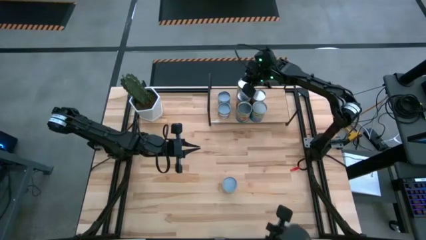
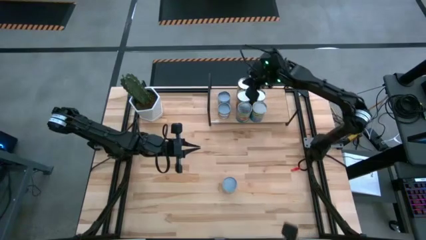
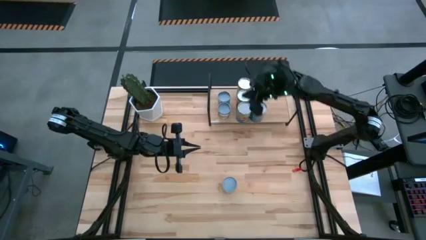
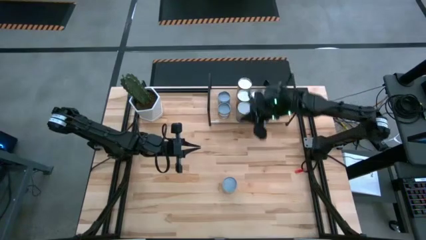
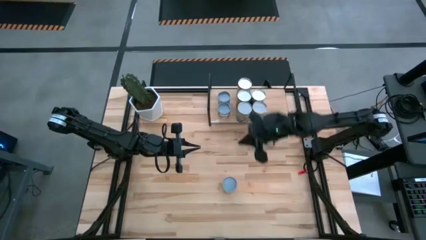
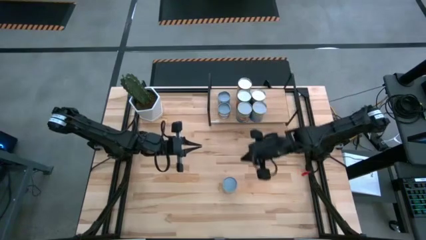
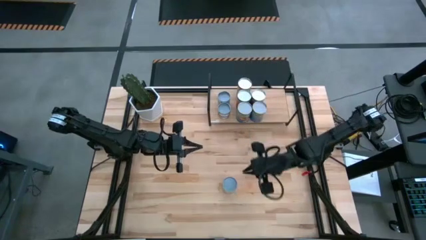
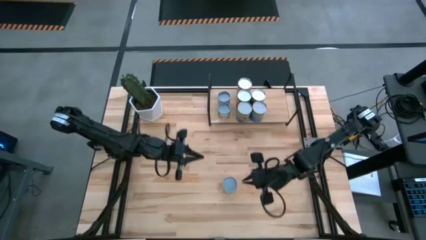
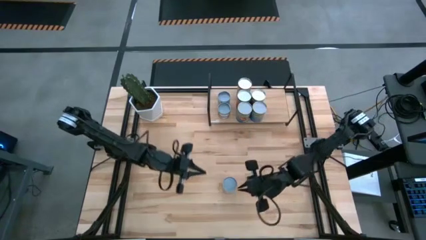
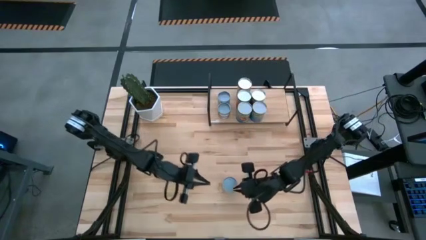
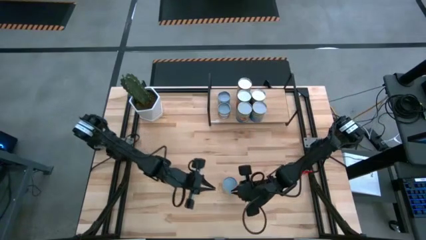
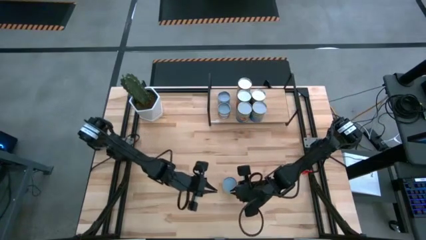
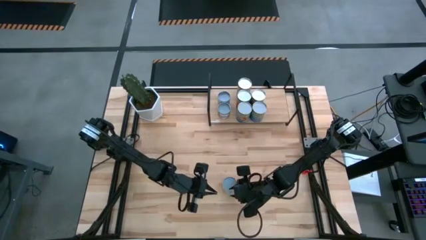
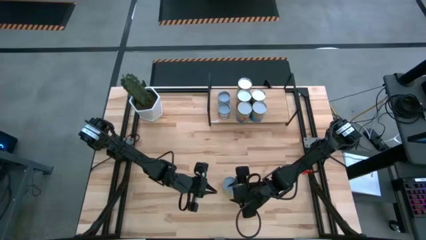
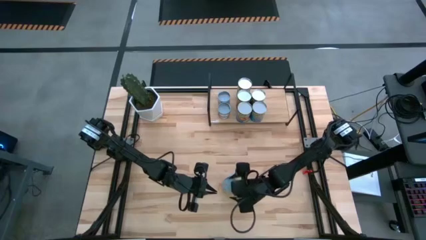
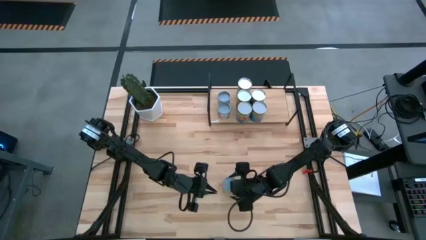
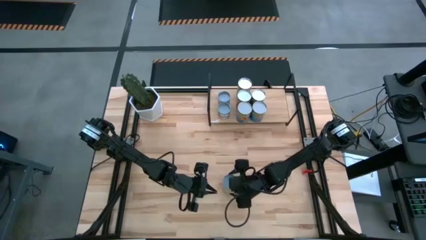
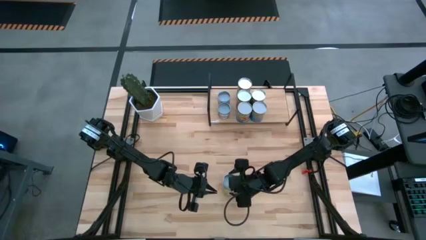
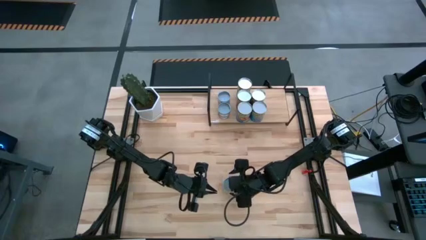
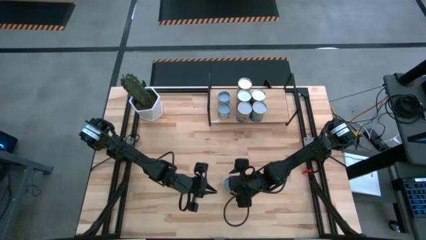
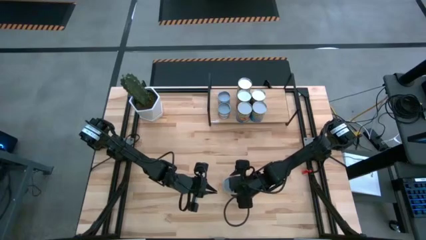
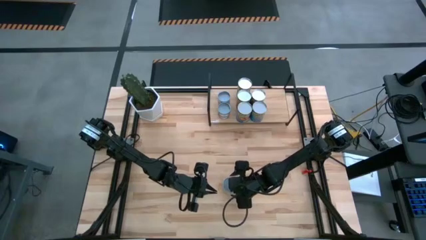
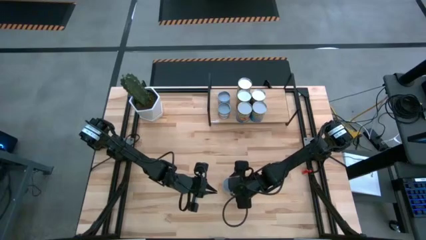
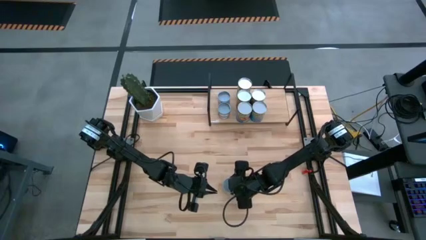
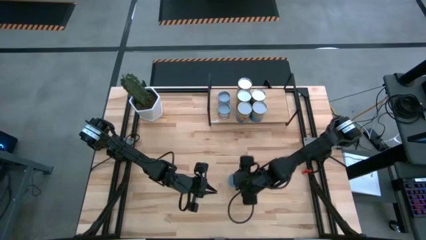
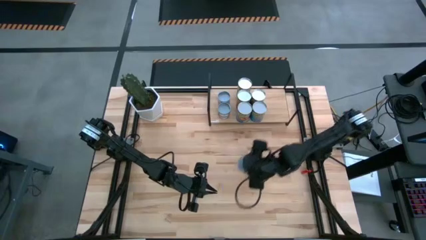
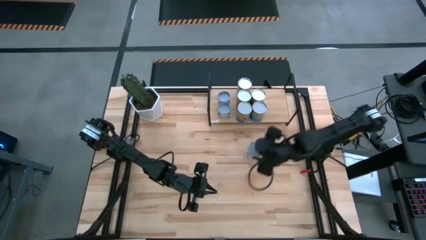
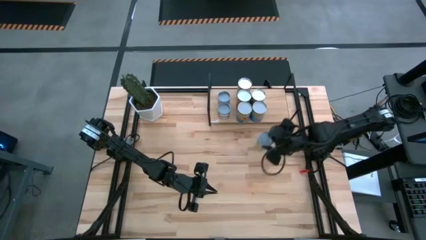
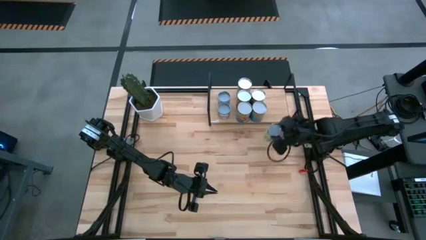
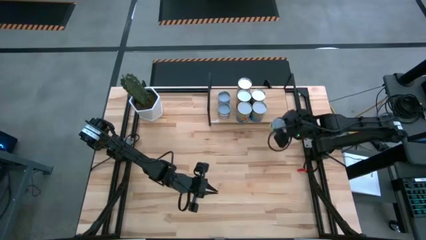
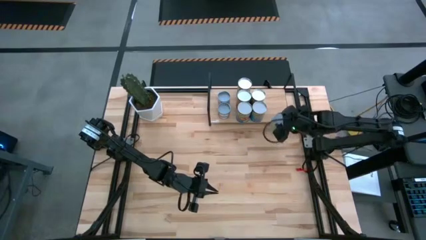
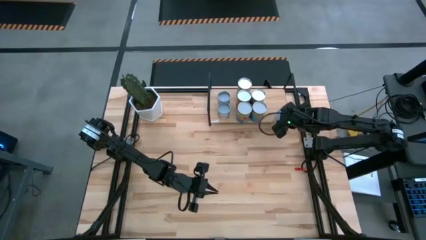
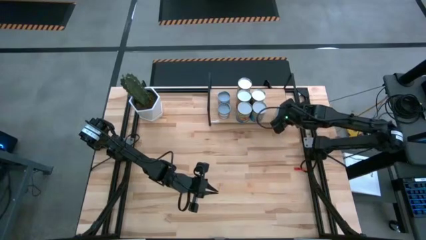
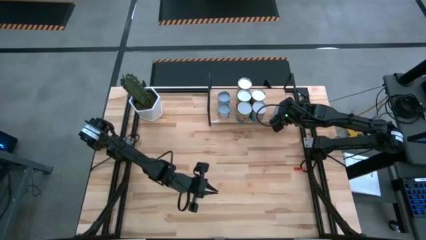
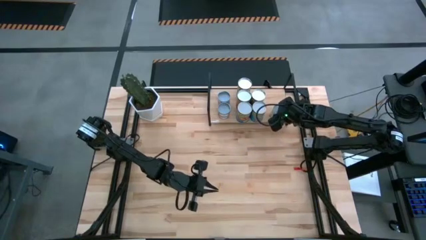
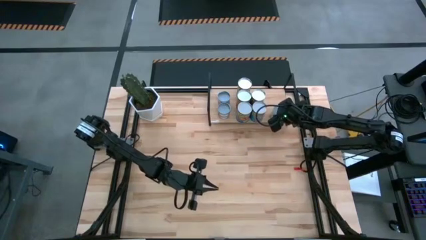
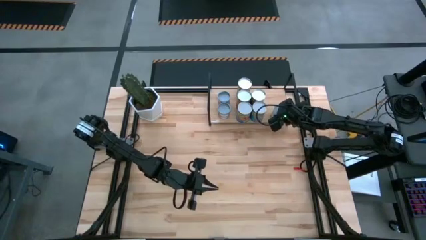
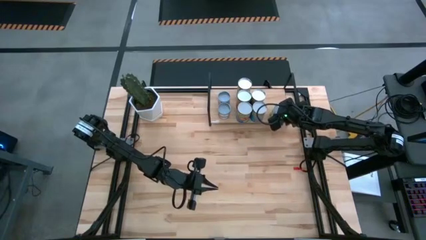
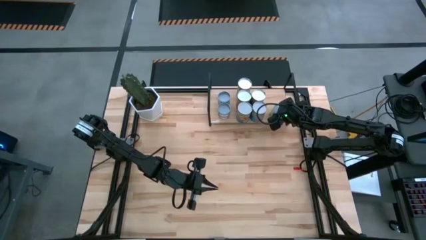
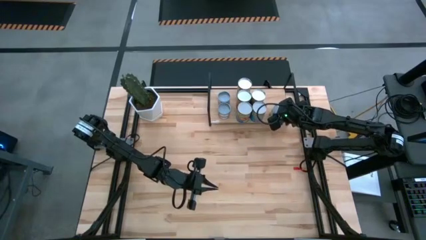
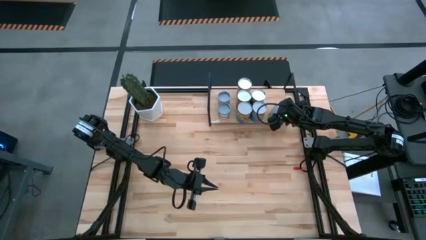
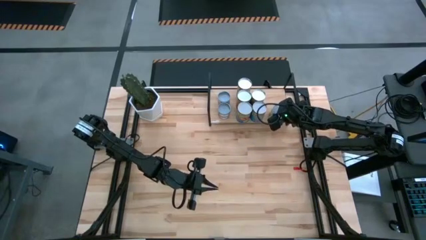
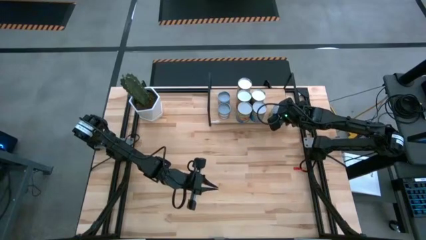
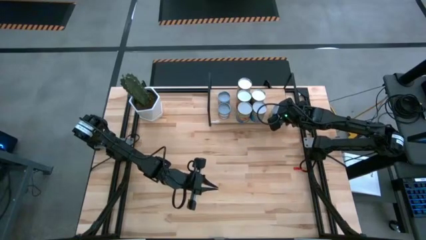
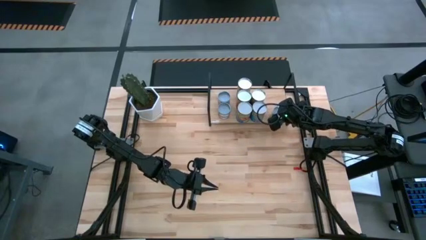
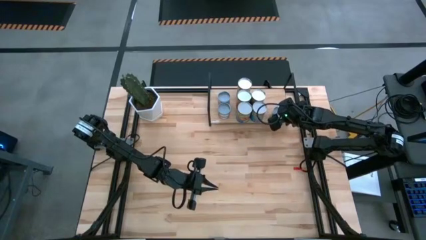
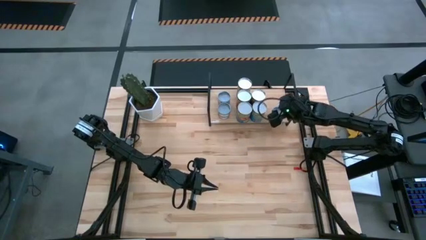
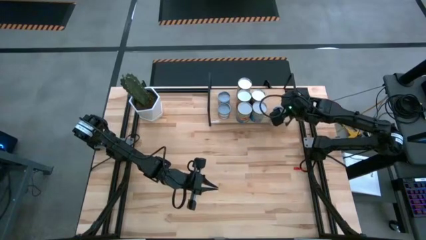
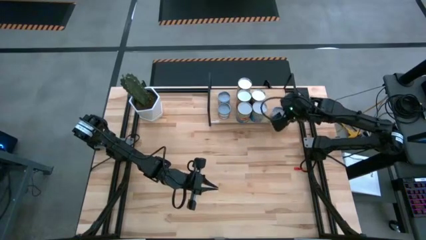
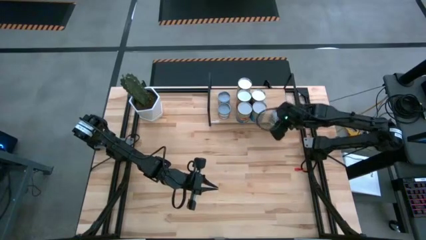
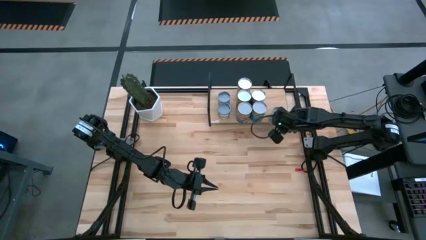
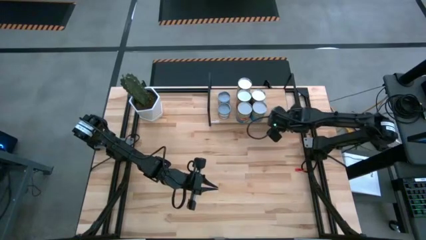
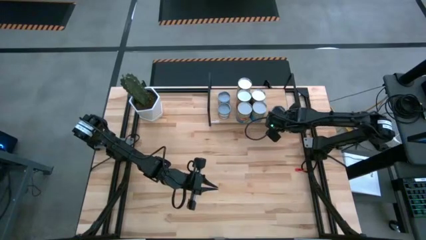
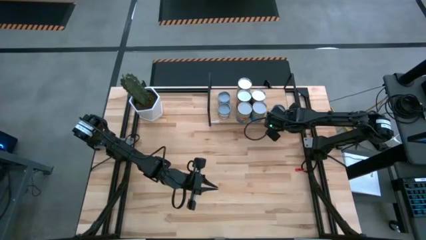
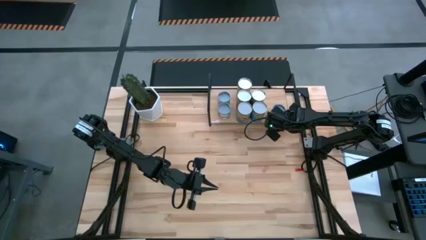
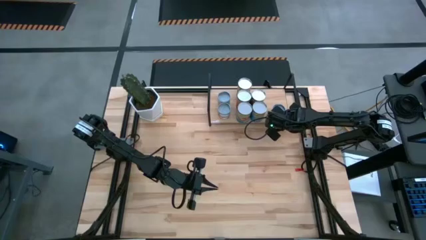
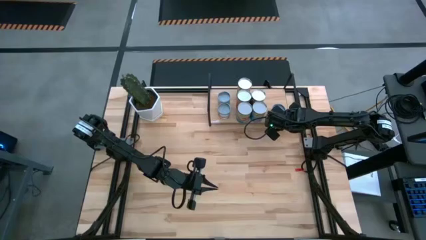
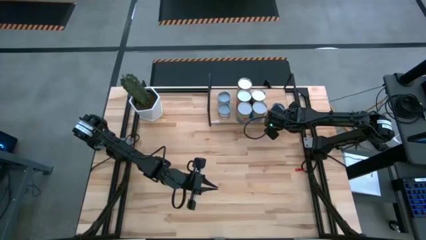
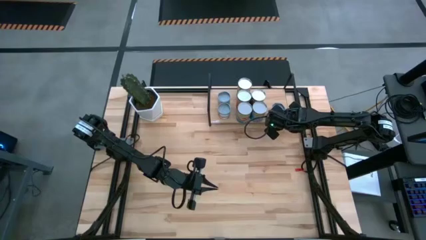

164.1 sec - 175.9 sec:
Task: Pick and place cans onto a shelf
Put the canned mixed fruits on the shelf
